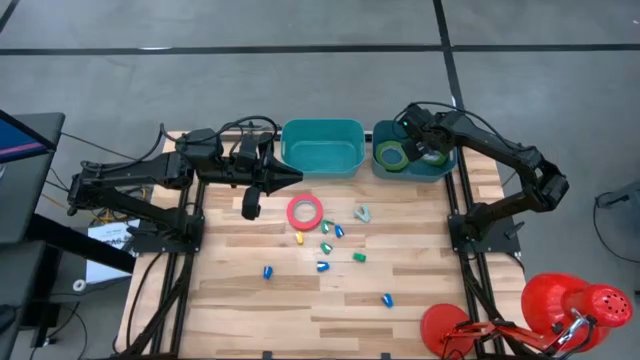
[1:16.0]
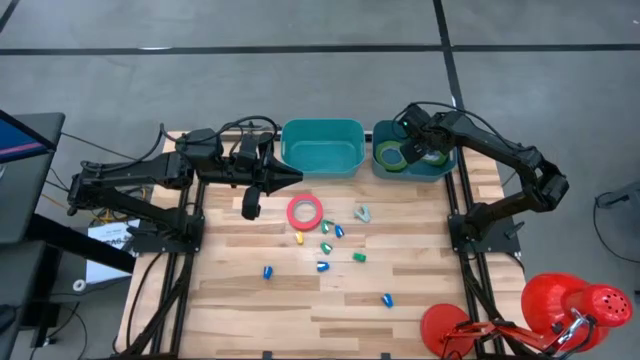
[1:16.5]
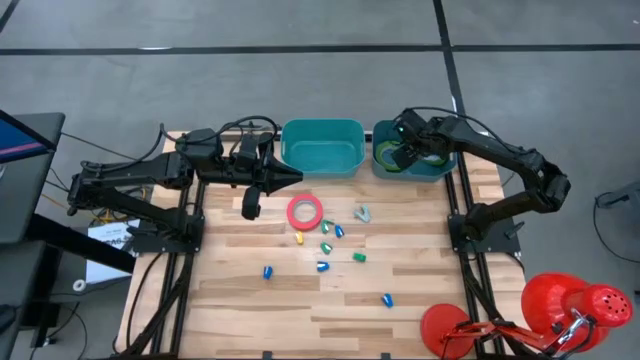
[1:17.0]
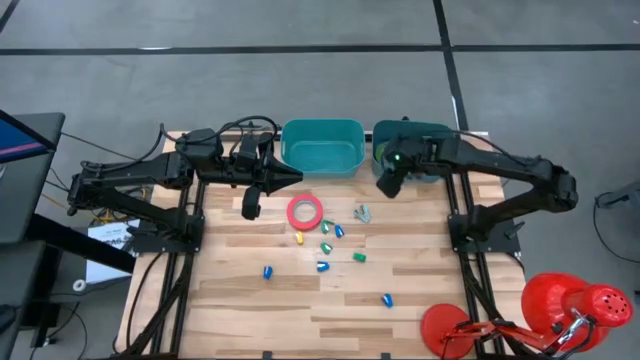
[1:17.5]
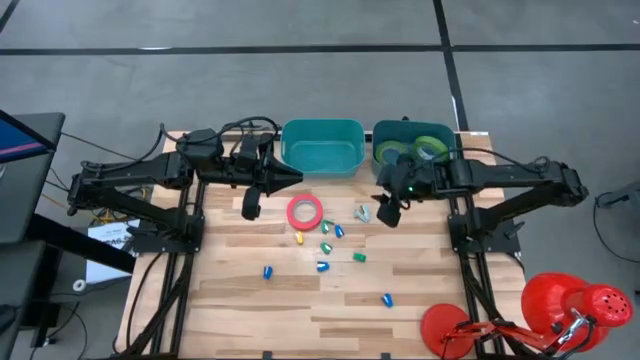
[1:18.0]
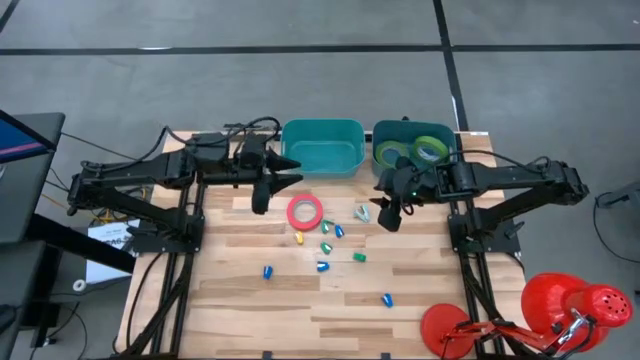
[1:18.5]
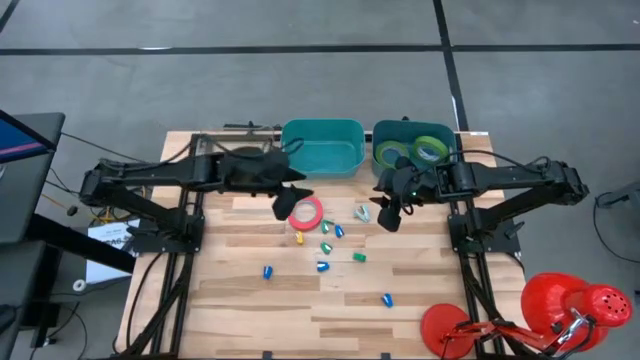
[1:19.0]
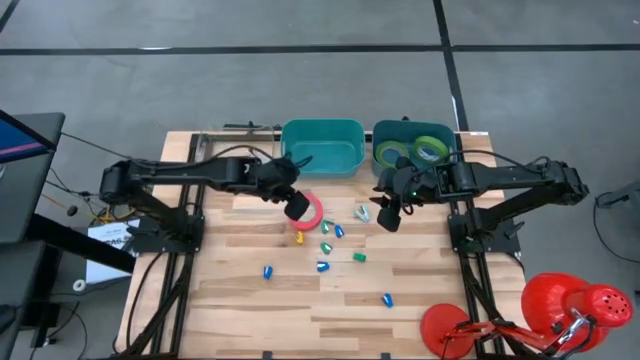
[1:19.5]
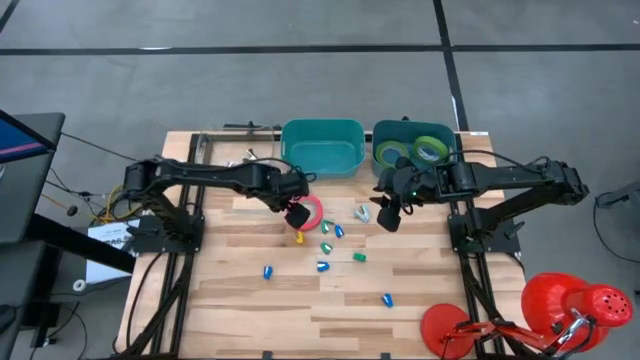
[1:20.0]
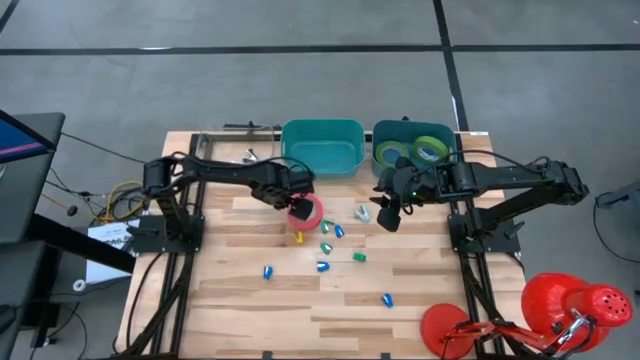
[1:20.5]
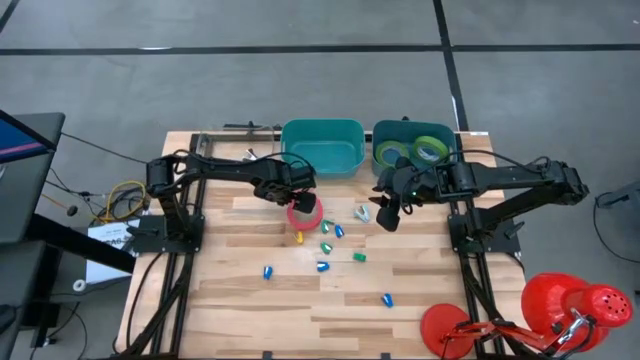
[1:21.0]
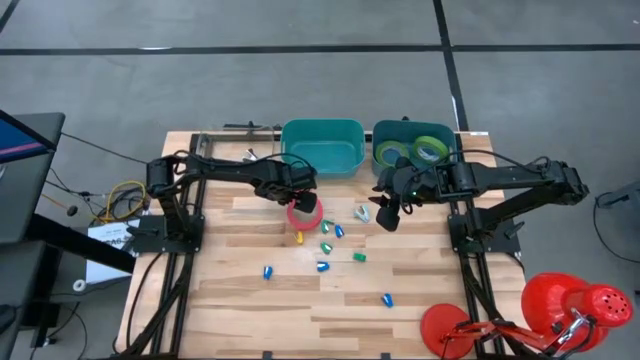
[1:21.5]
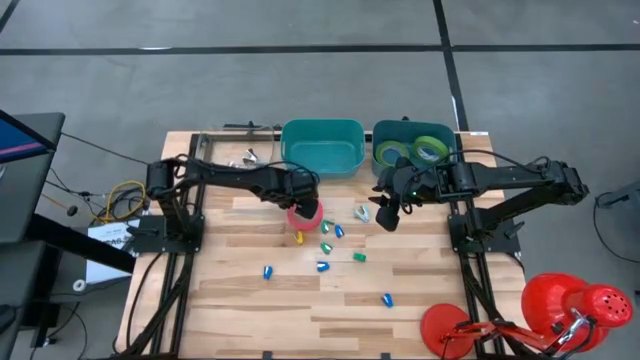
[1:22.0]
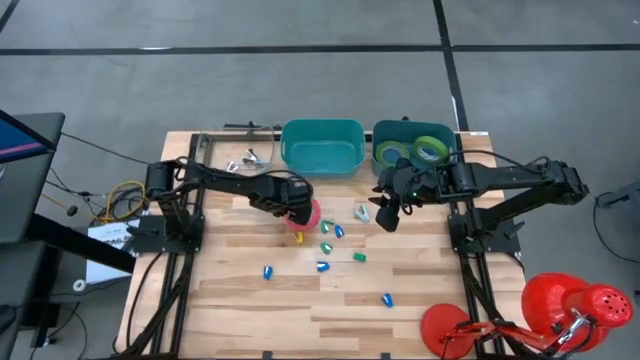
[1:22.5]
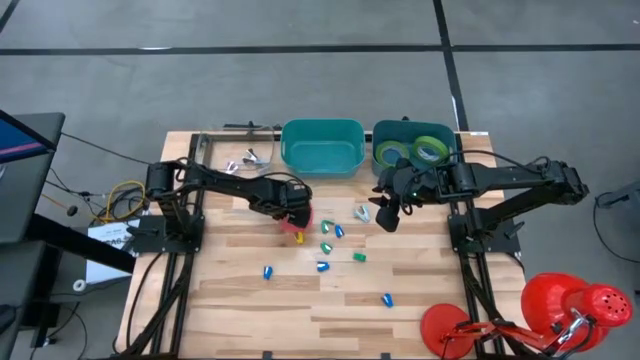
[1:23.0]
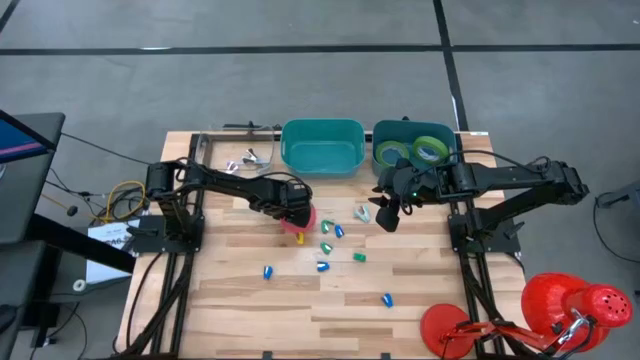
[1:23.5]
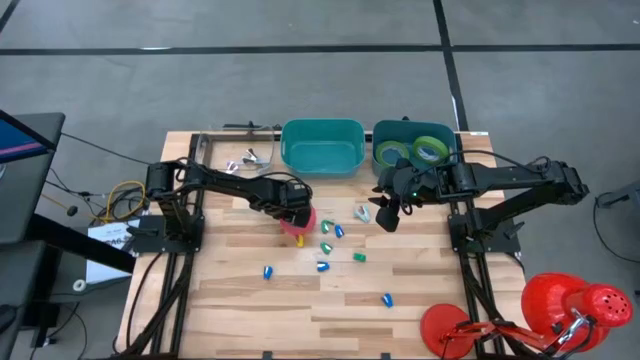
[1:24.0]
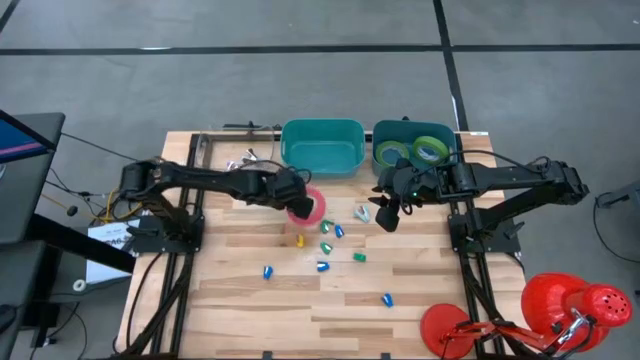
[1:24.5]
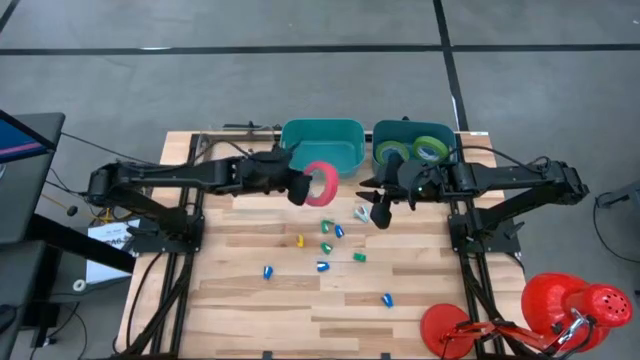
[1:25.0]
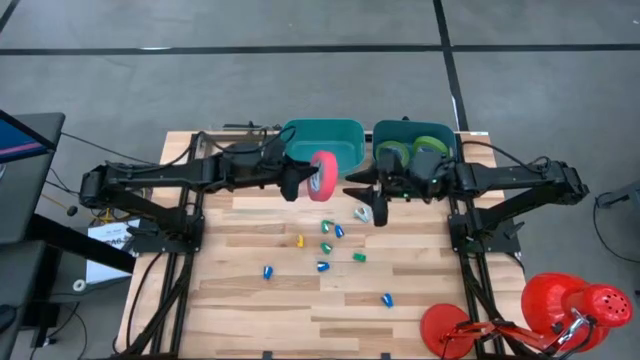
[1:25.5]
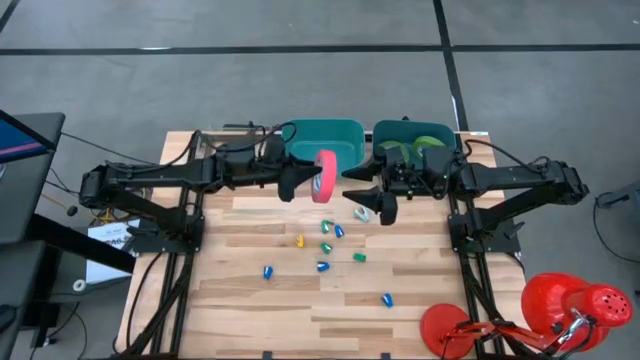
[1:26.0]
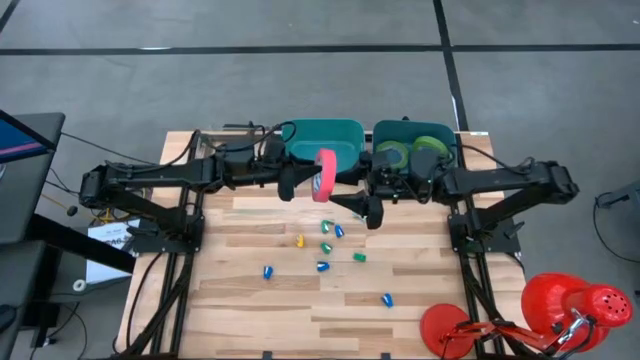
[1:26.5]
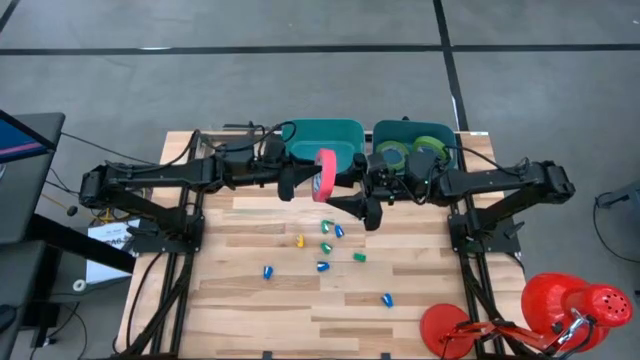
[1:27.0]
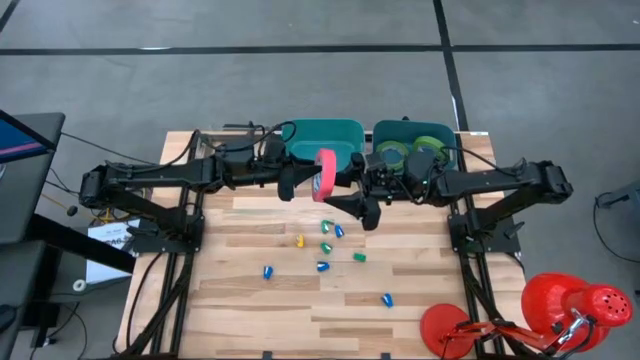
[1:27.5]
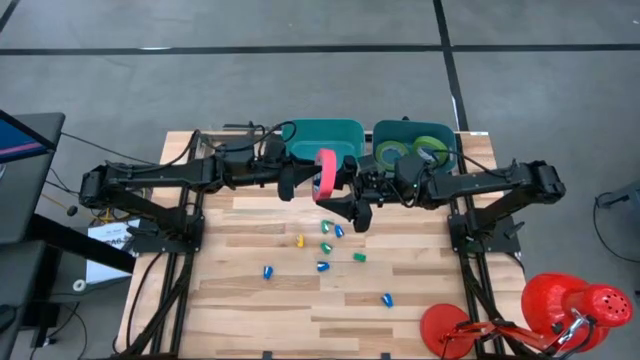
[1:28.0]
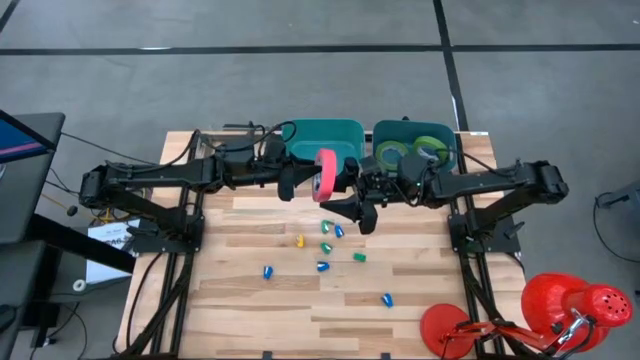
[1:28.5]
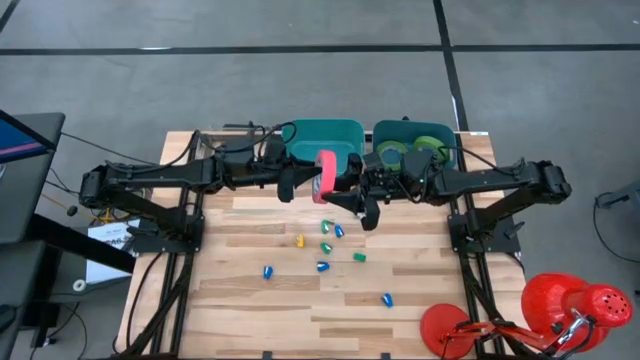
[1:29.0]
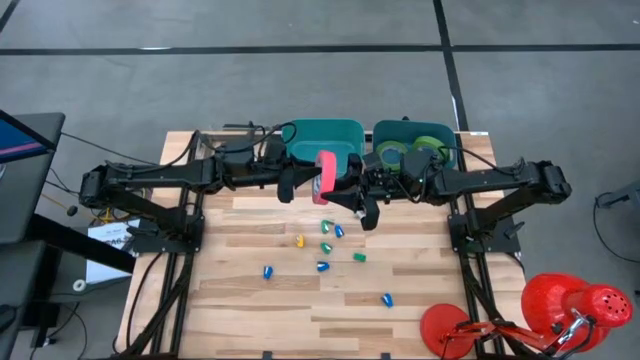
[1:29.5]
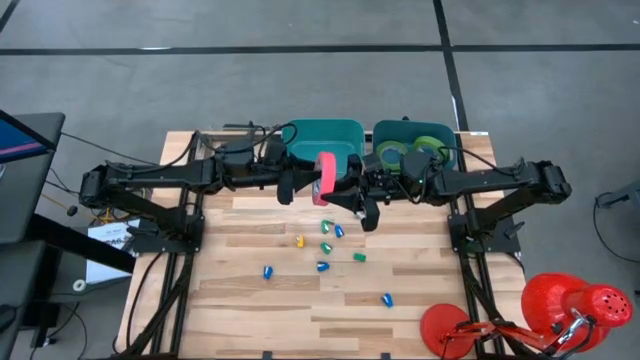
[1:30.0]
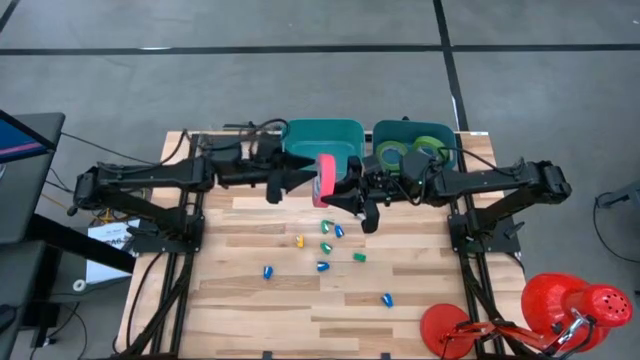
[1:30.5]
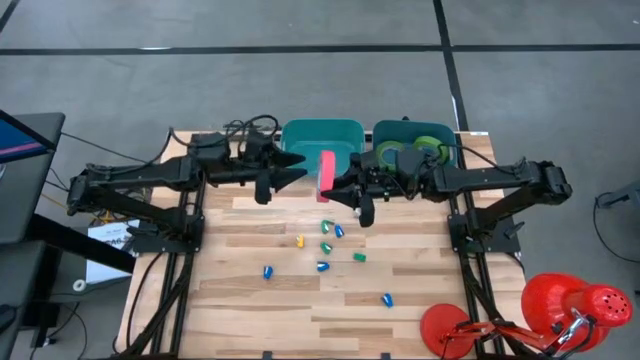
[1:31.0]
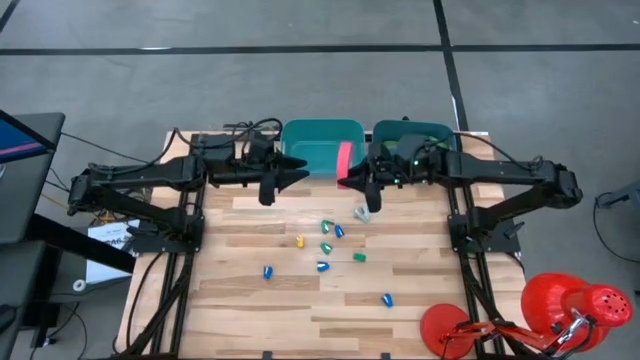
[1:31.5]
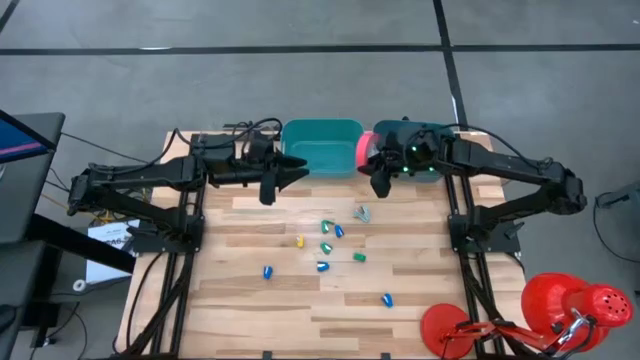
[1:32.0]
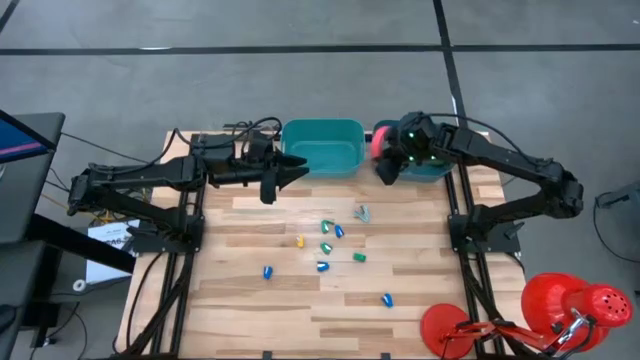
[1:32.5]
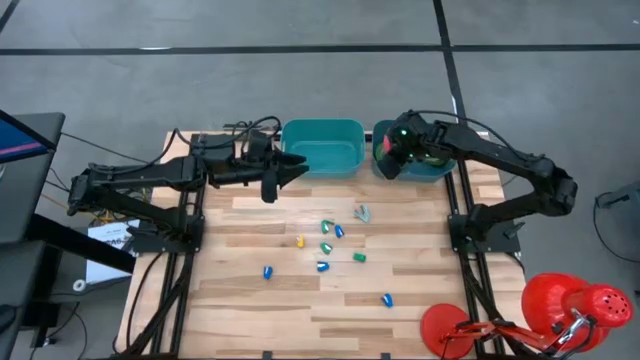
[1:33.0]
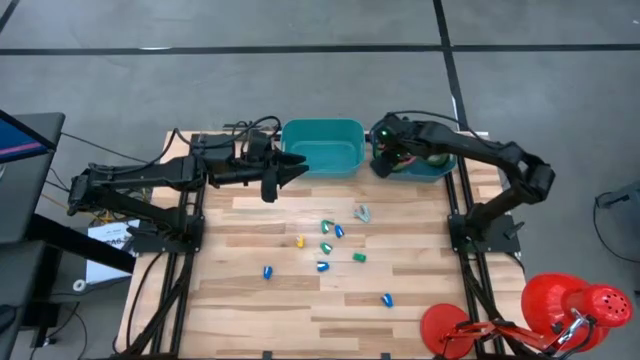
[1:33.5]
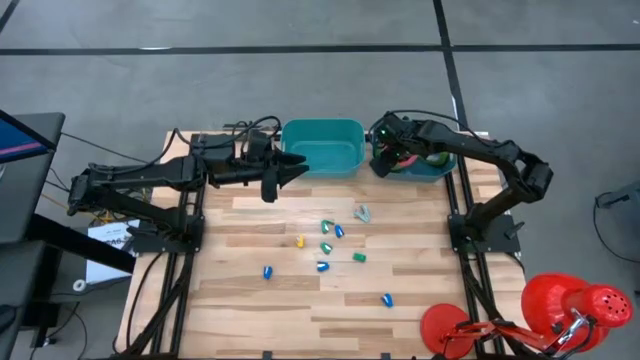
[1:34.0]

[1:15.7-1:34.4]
Task: Pick and place Stapler, Stapler remover, tape
Put the pink tape into the blue bin

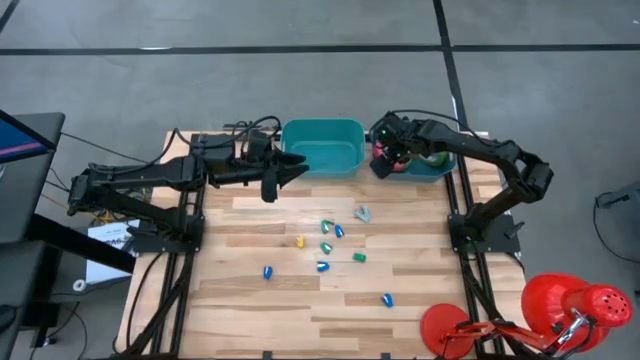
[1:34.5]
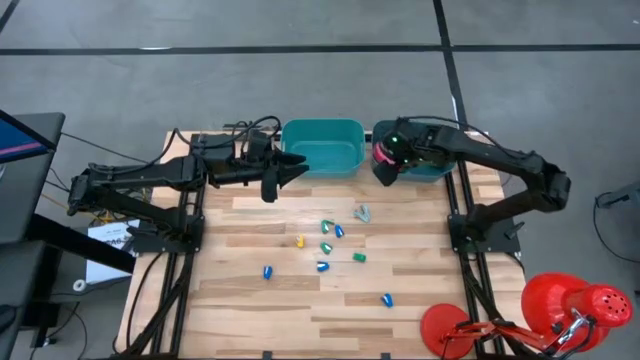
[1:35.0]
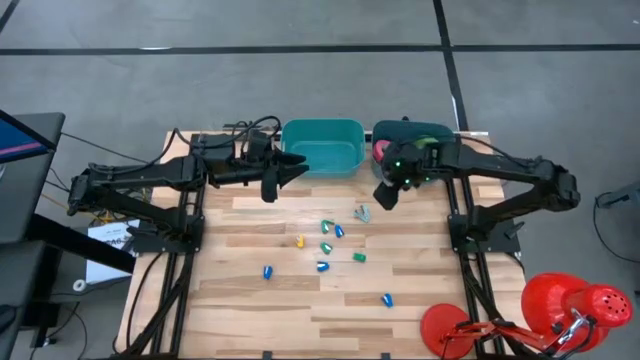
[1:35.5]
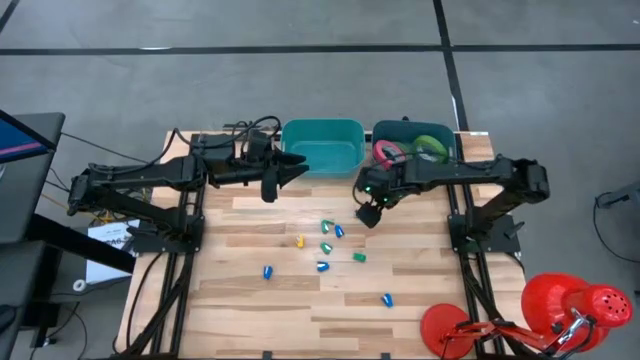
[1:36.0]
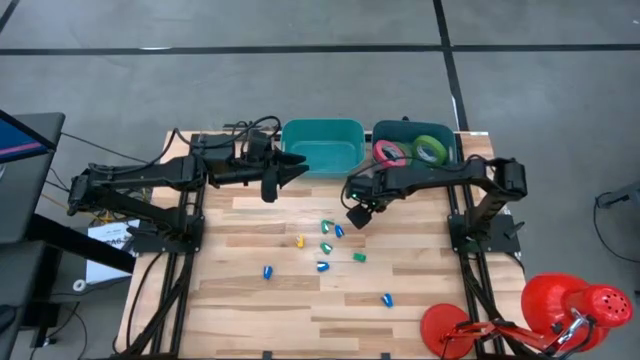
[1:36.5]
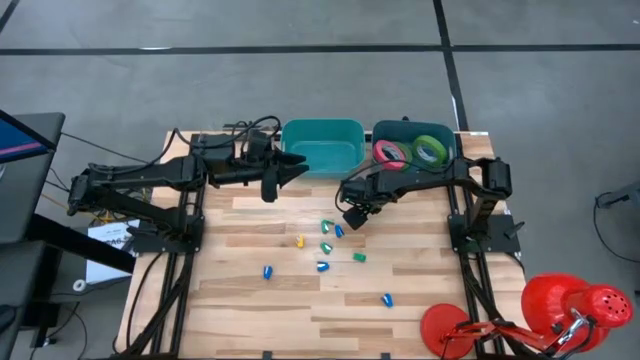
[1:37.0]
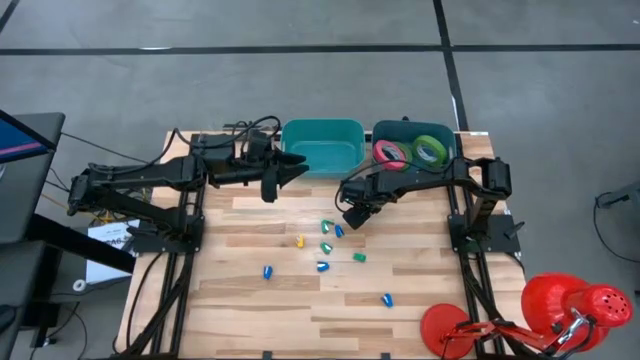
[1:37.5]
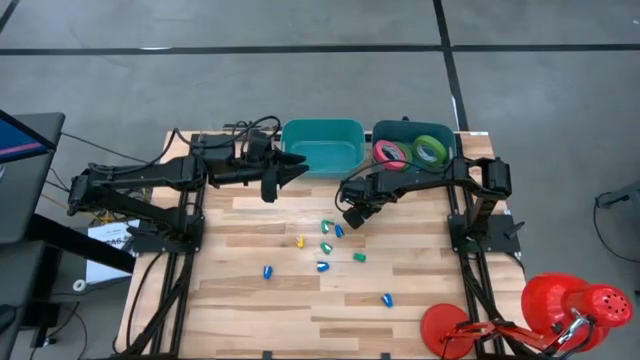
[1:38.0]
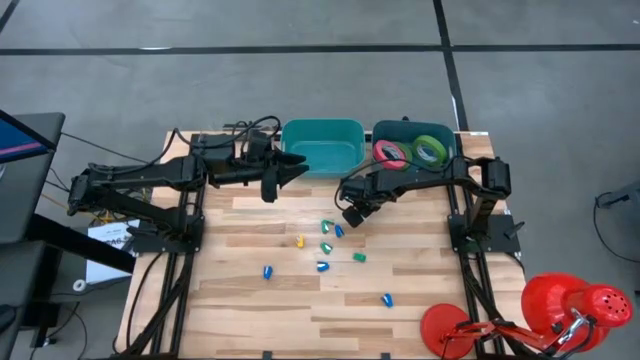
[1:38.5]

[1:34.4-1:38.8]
Put the light blue staple remover into the transparent bin
